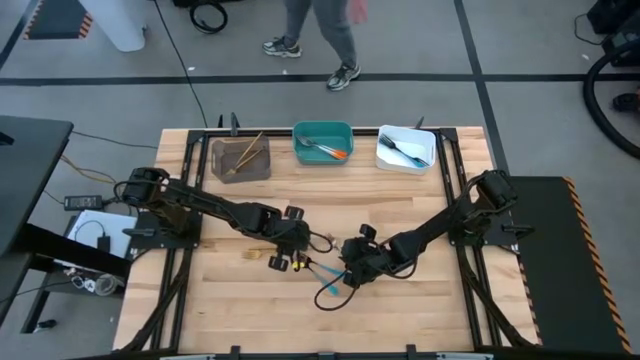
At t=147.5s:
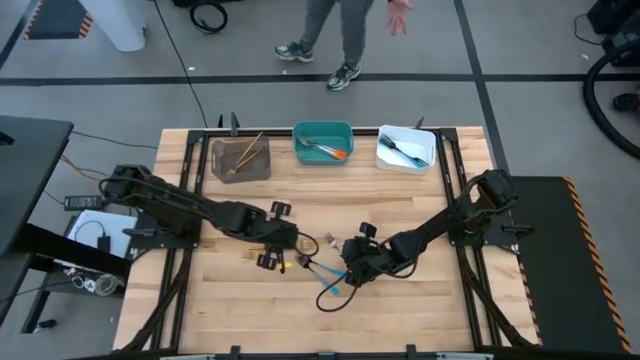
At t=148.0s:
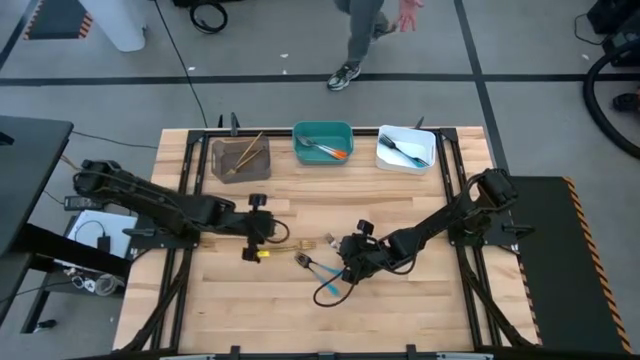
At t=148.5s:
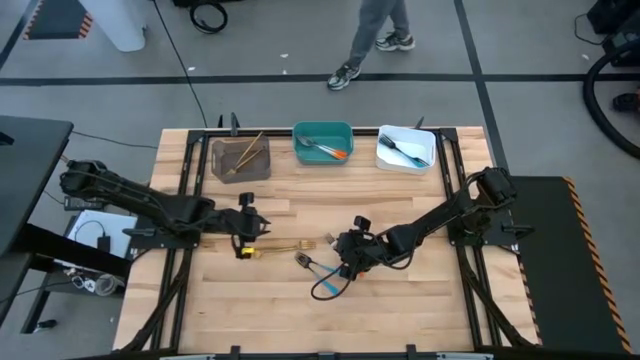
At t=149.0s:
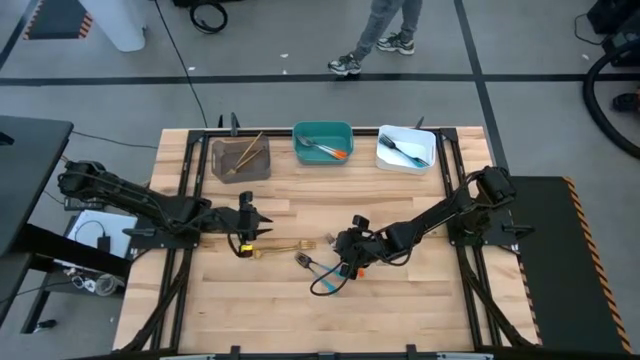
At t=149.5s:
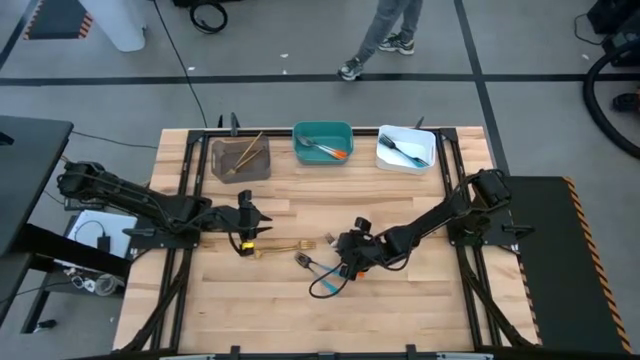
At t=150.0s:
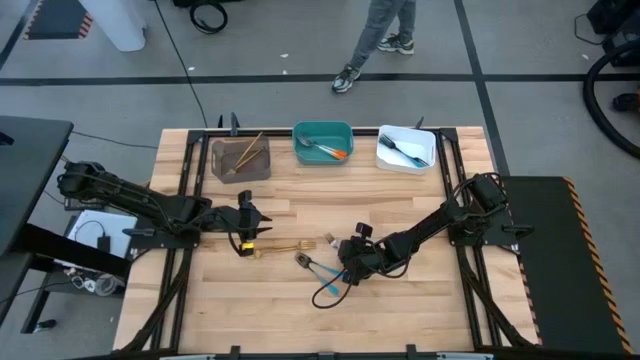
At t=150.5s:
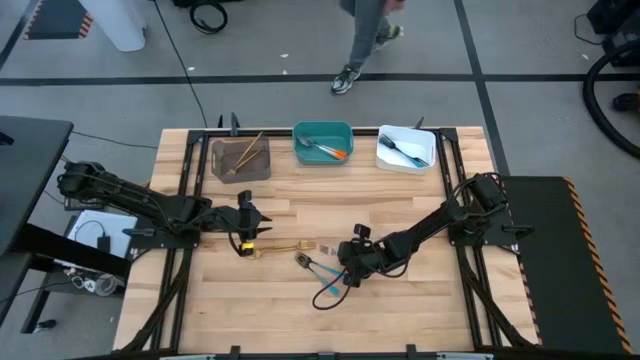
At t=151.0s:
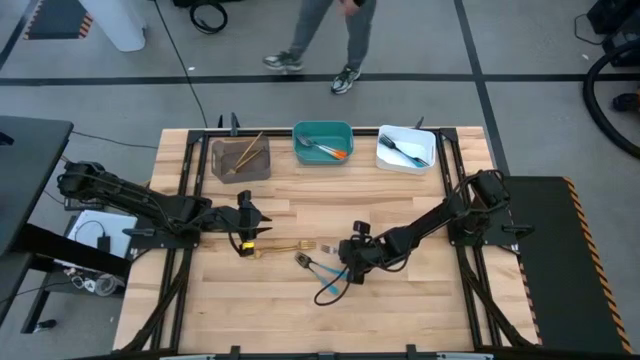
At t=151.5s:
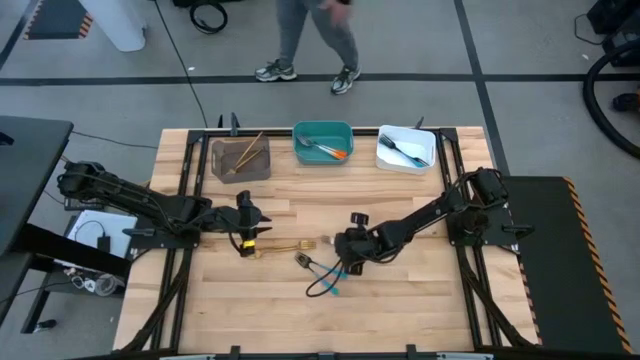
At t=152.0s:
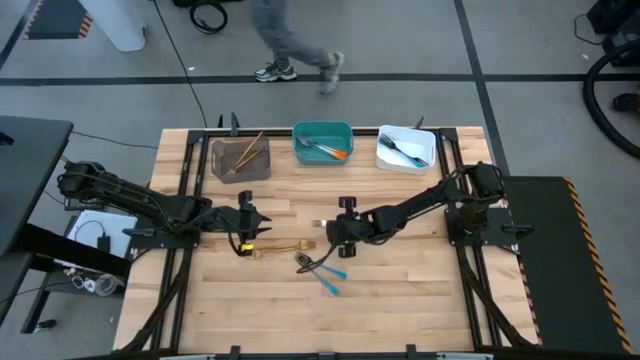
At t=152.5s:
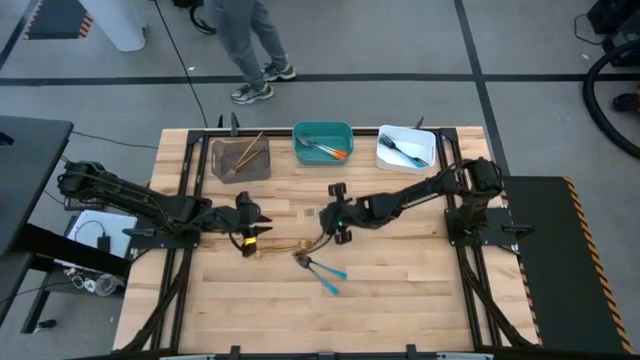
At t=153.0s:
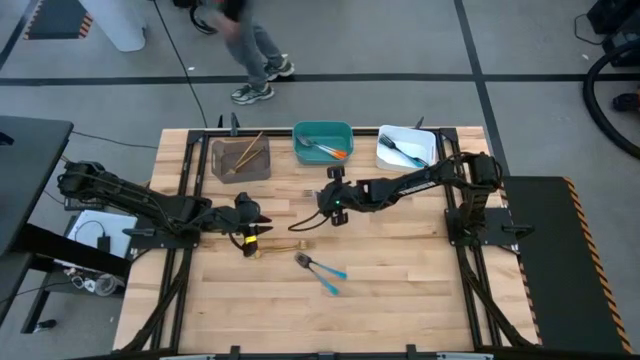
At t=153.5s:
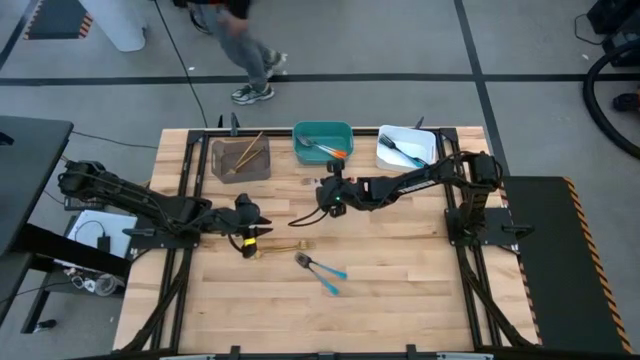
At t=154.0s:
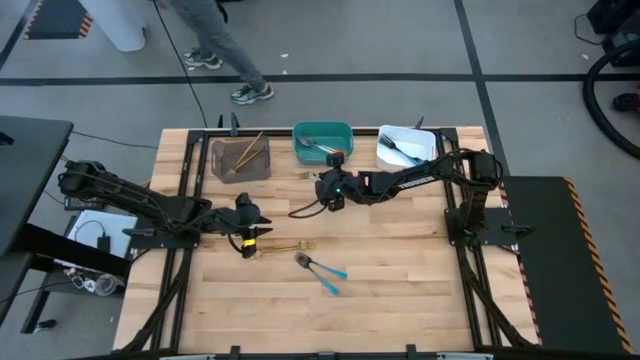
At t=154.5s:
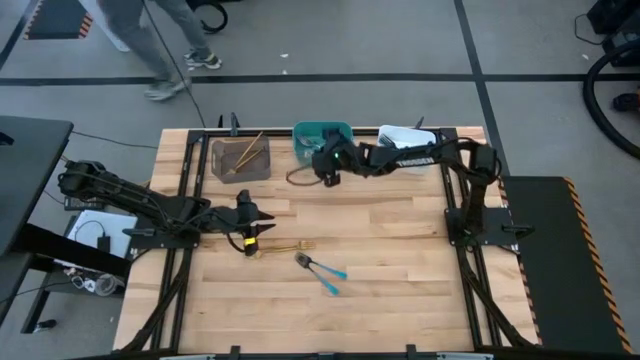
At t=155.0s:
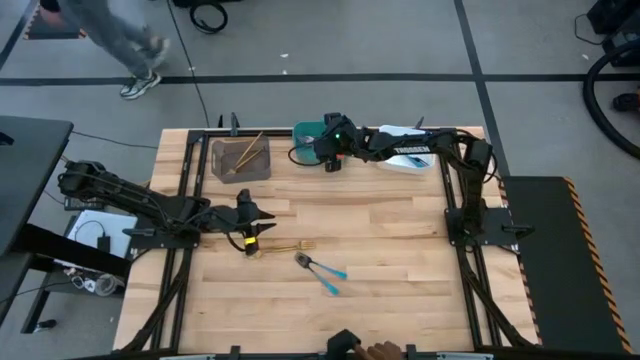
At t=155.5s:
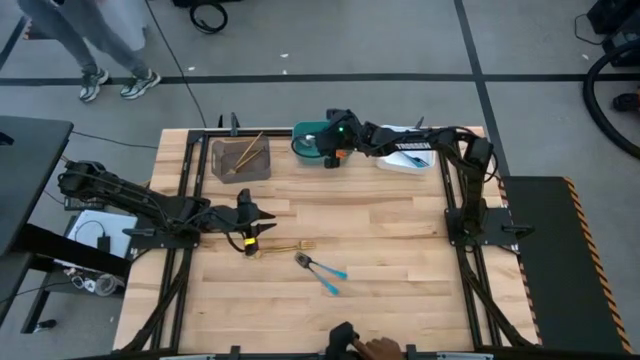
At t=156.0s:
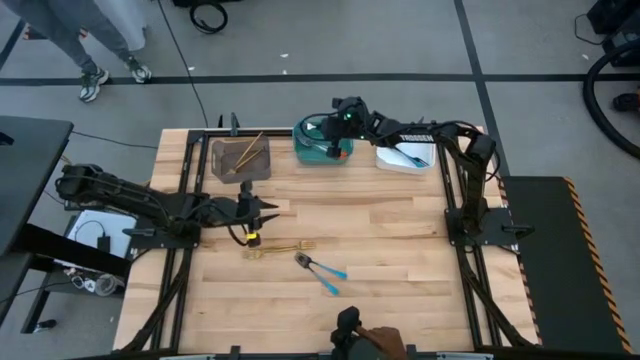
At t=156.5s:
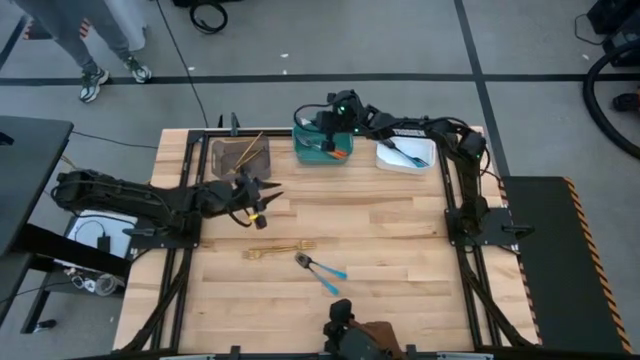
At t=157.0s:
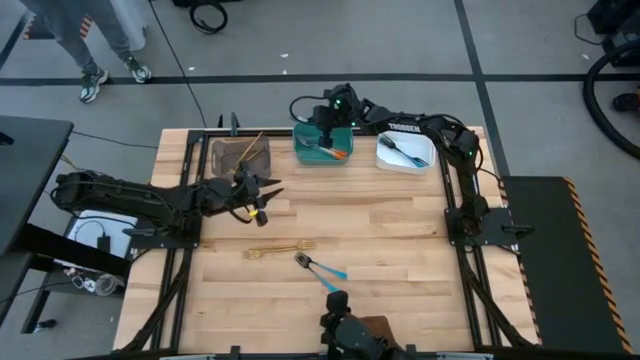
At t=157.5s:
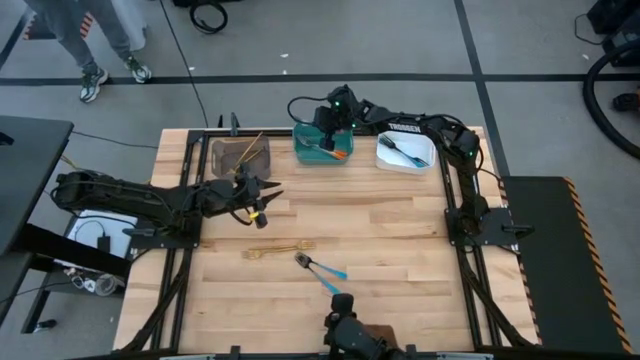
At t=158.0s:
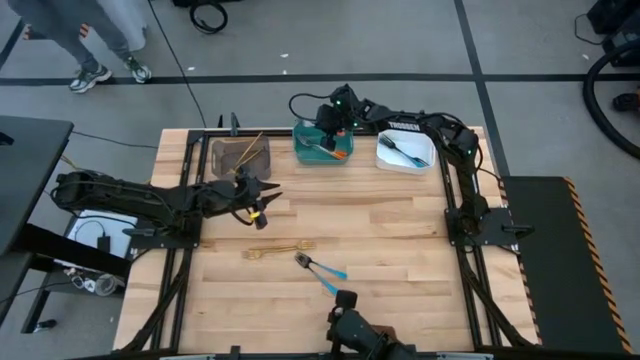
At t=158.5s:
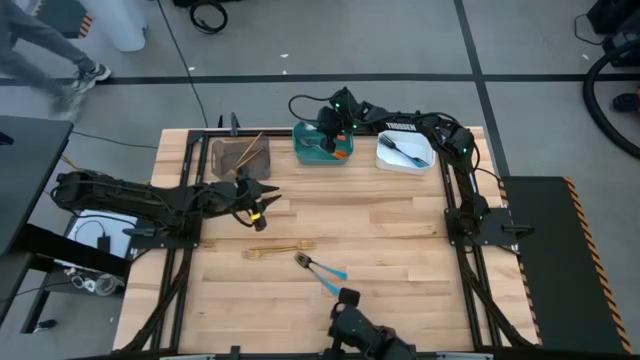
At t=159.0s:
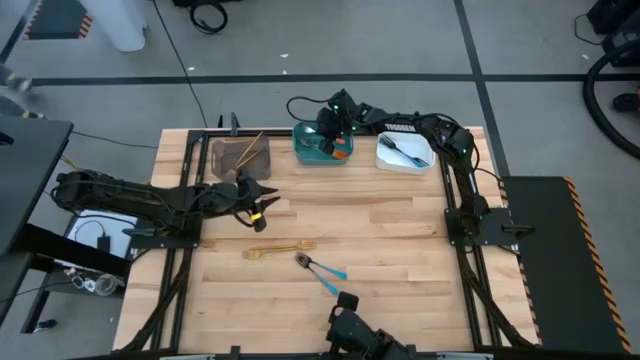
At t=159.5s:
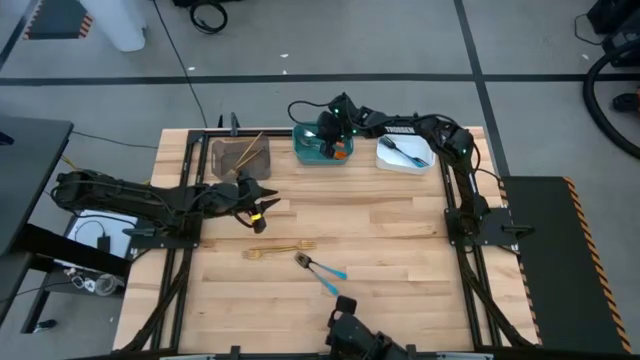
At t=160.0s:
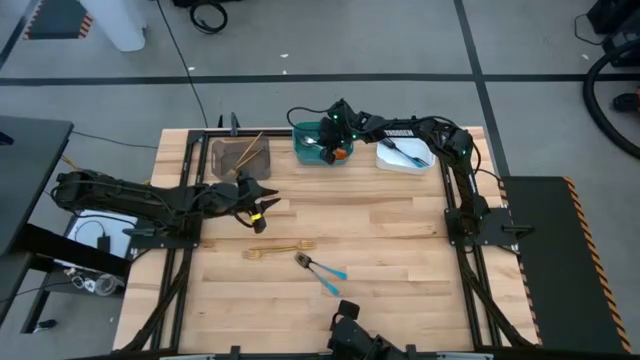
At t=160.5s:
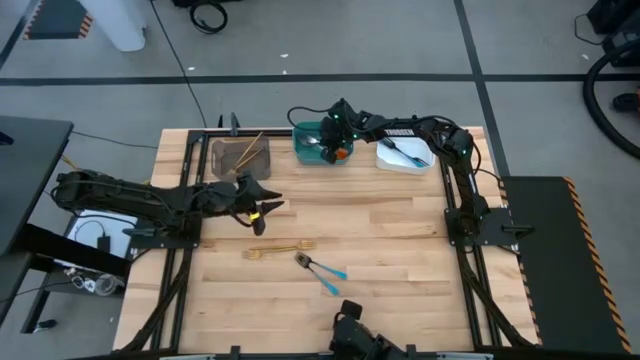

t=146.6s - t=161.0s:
Task: Sort silverware by color (type)
Put the orange fork into the blue bin

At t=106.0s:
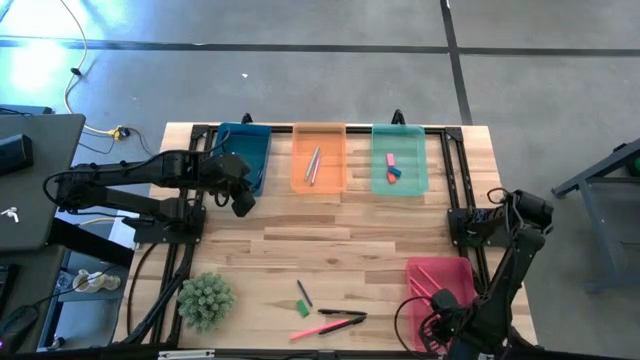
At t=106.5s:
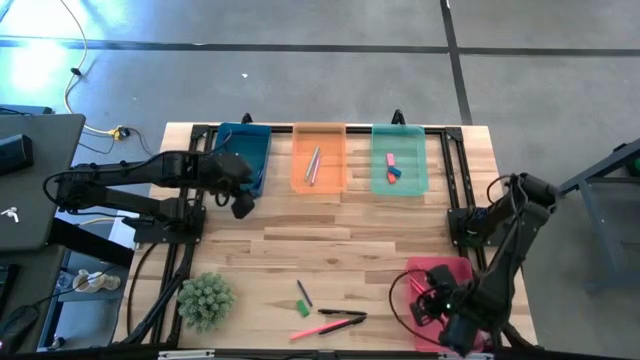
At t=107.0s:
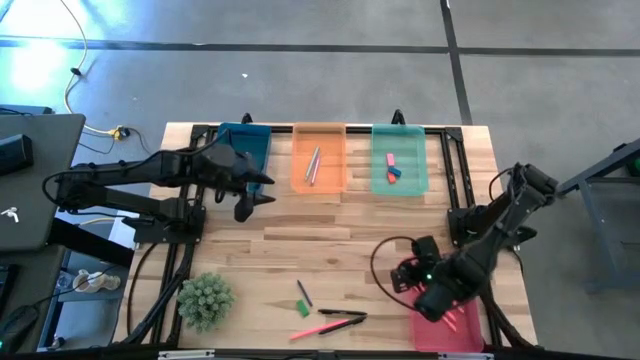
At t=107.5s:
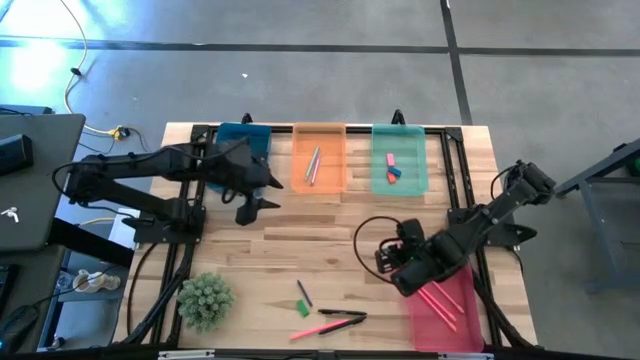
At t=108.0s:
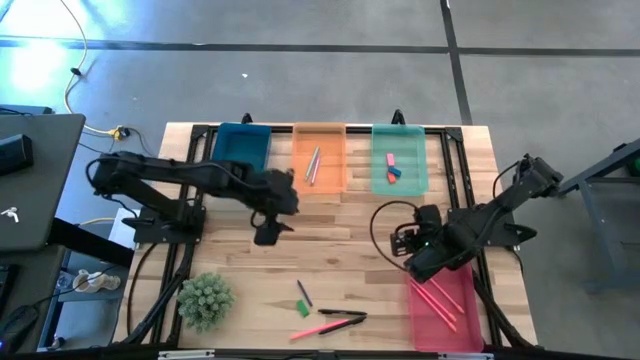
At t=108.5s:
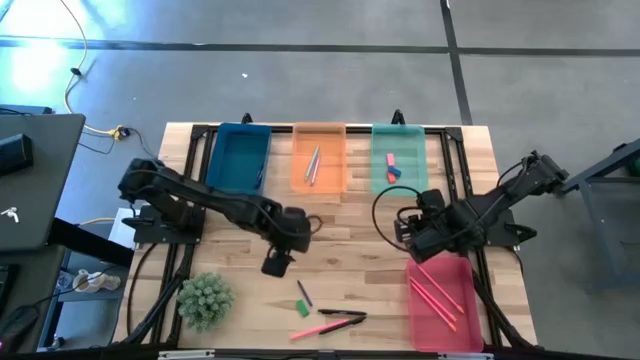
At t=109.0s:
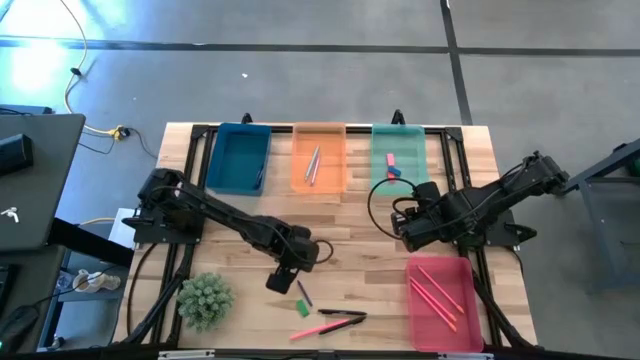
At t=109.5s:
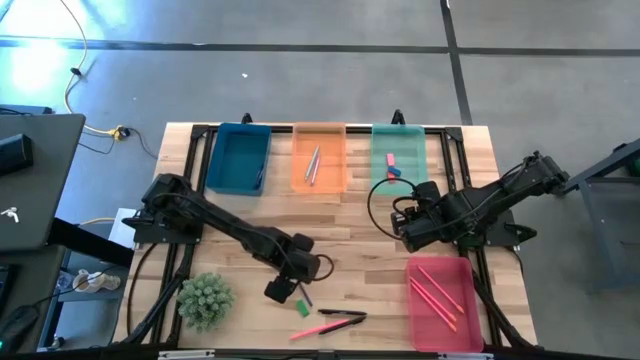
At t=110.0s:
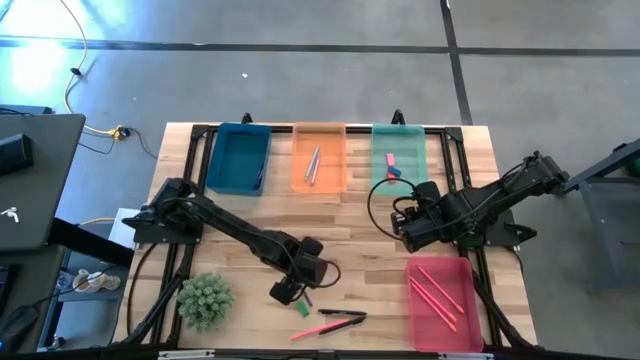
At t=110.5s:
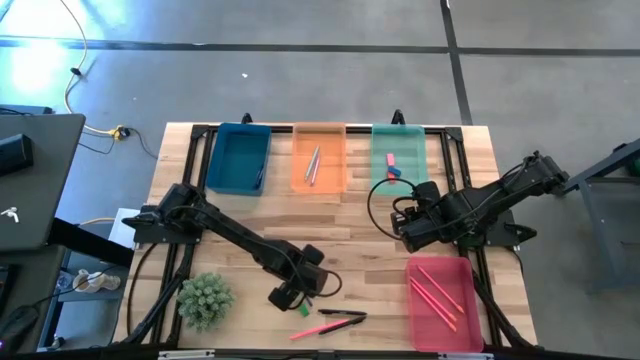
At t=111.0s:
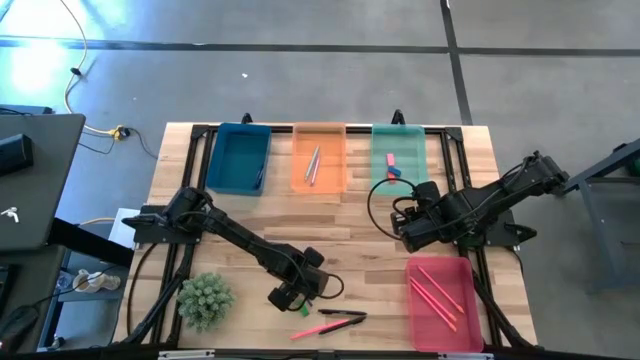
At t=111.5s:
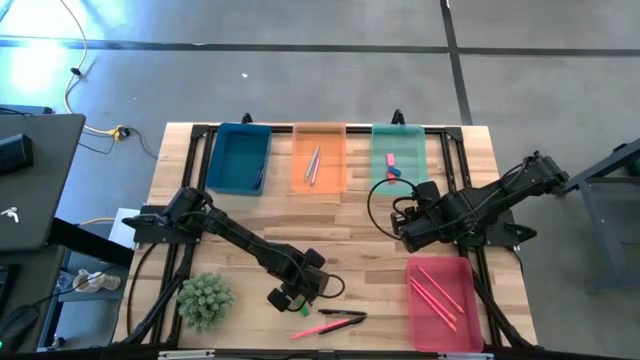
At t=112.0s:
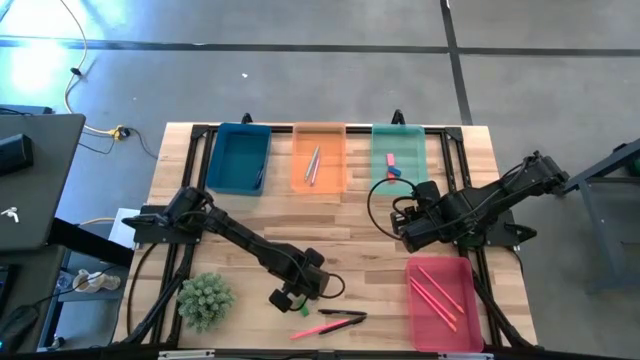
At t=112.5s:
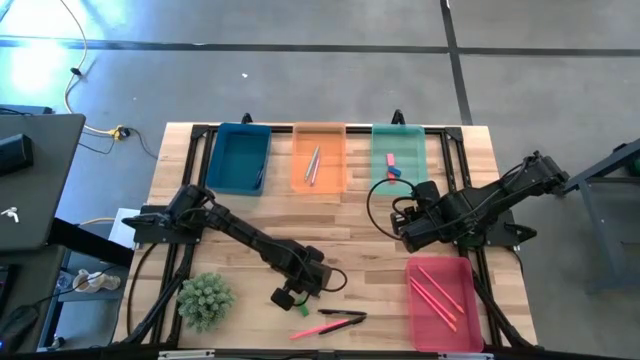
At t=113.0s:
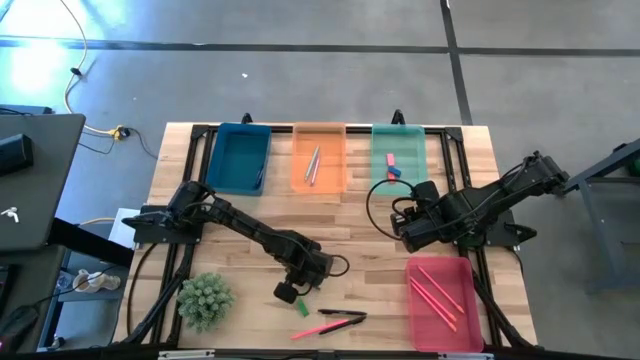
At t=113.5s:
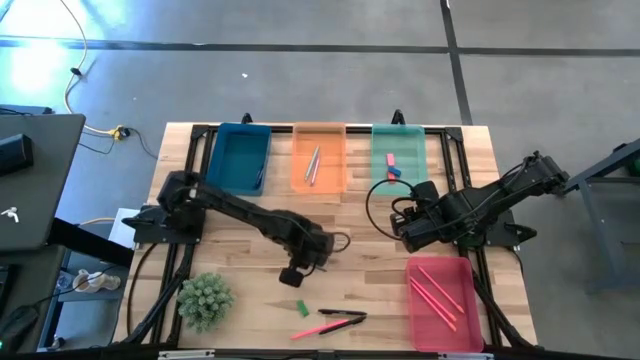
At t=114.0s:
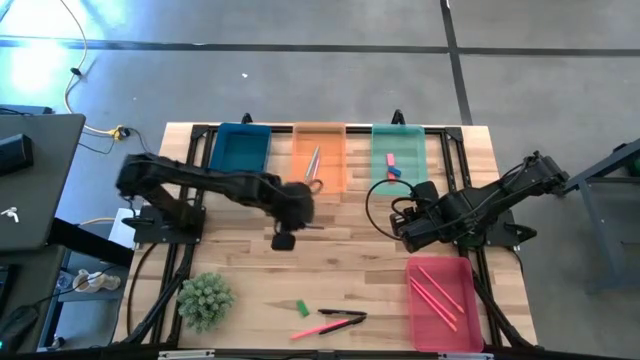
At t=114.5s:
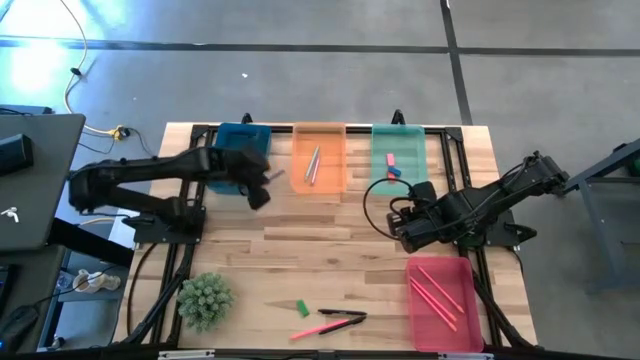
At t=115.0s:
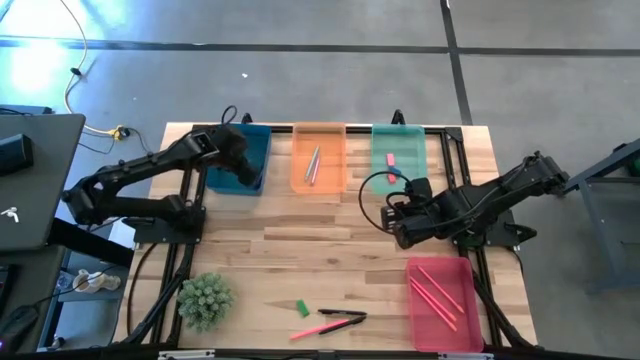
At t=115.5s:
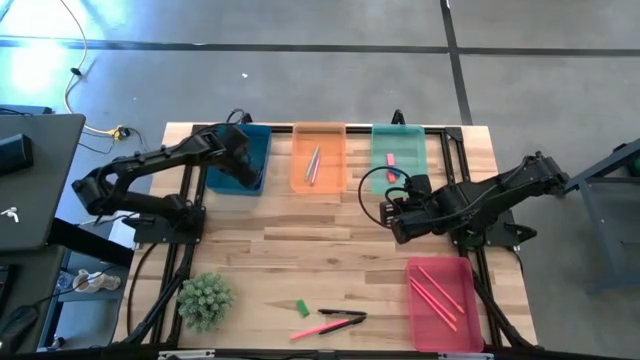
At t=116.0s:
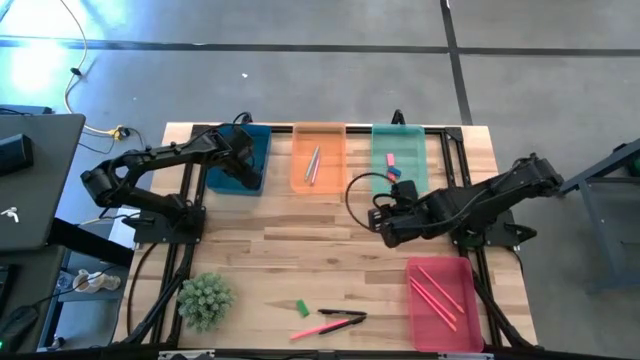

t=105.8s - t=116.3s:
Task: Sort crayons/erasers/pens/pencils in bins
Put the blue crayon into the blue bin
